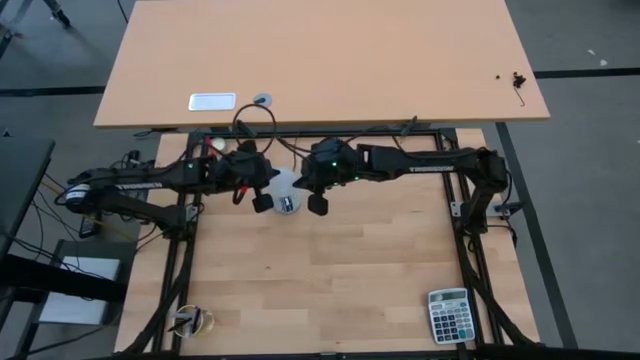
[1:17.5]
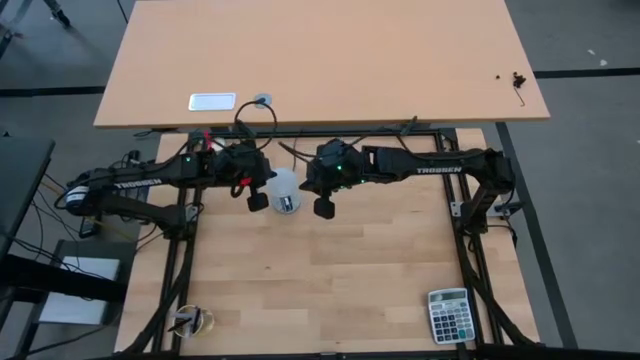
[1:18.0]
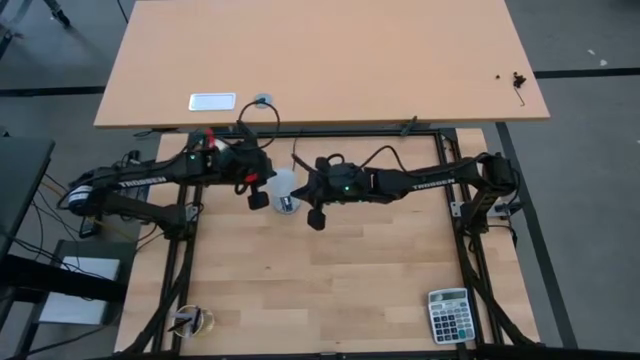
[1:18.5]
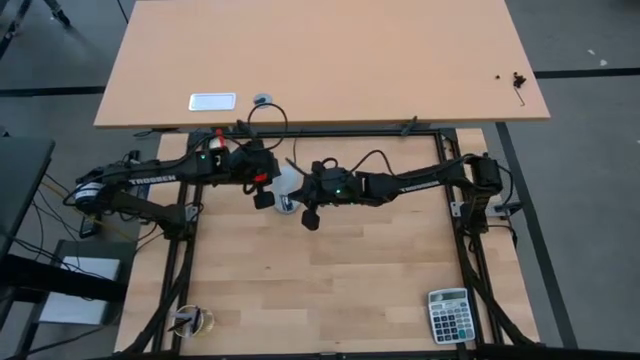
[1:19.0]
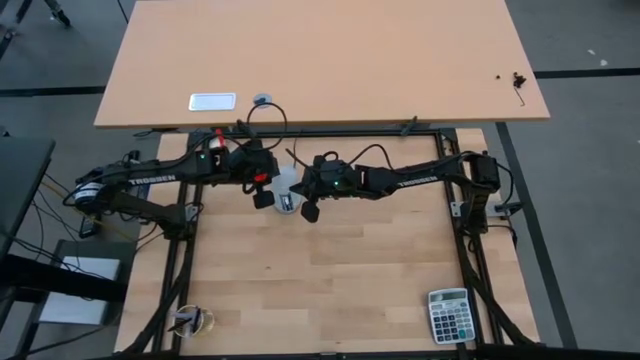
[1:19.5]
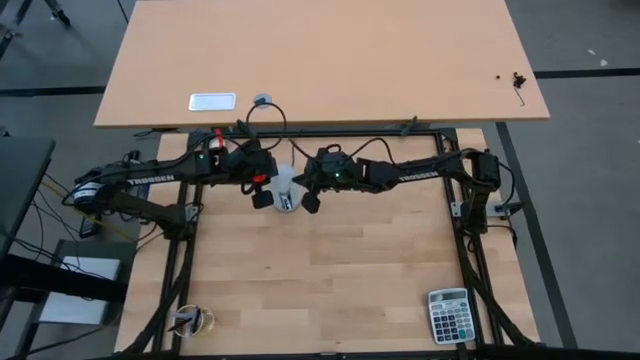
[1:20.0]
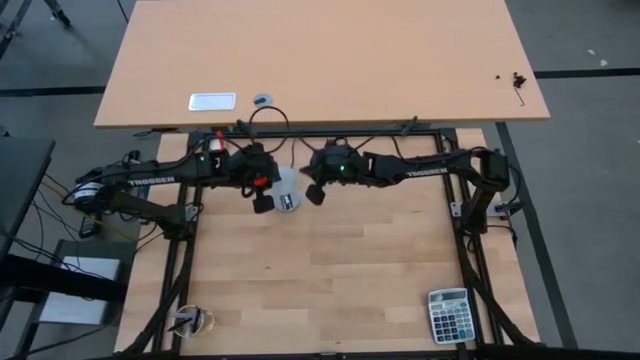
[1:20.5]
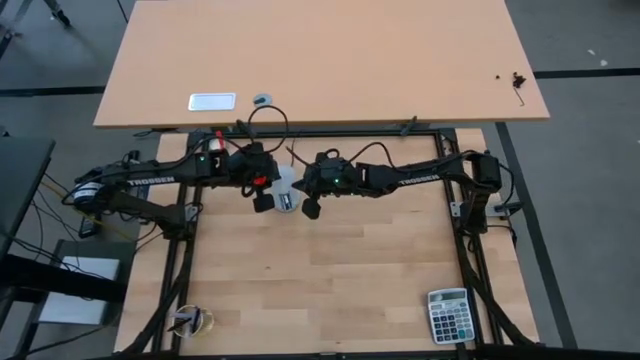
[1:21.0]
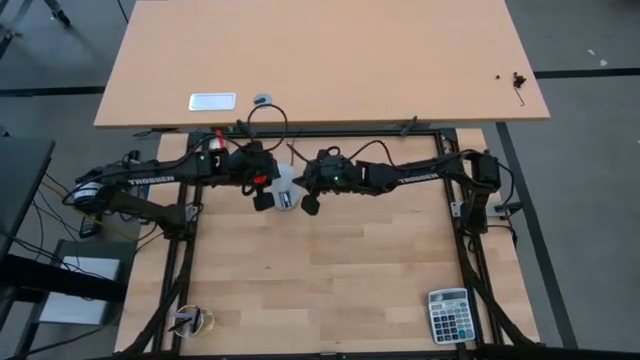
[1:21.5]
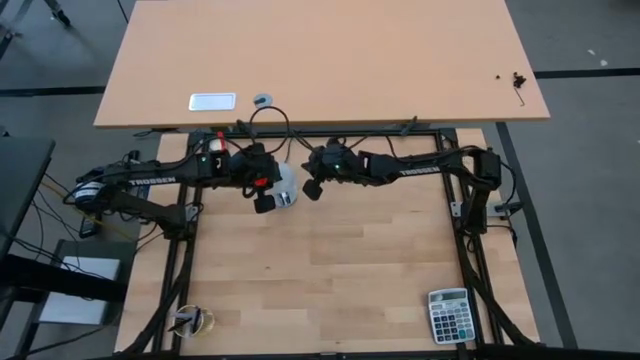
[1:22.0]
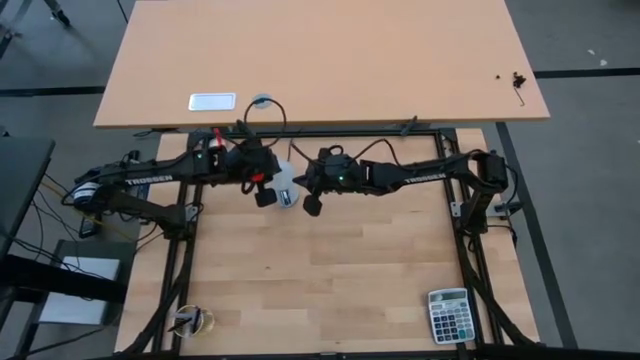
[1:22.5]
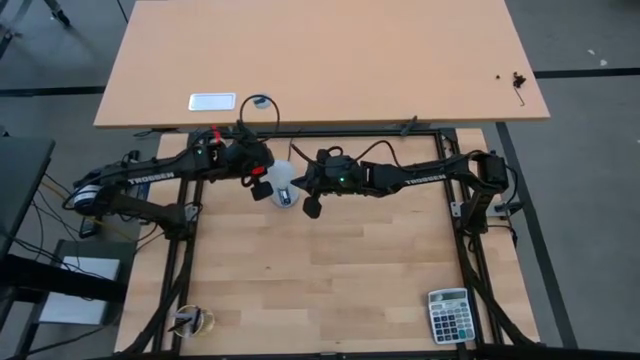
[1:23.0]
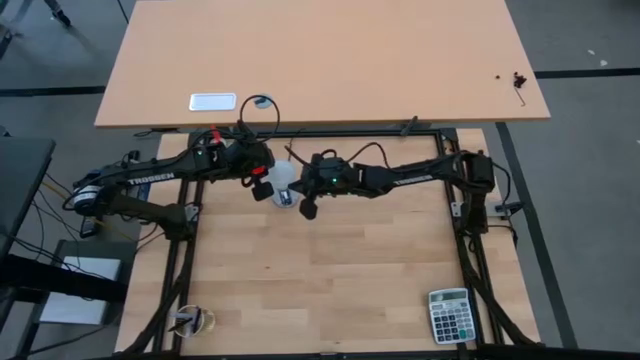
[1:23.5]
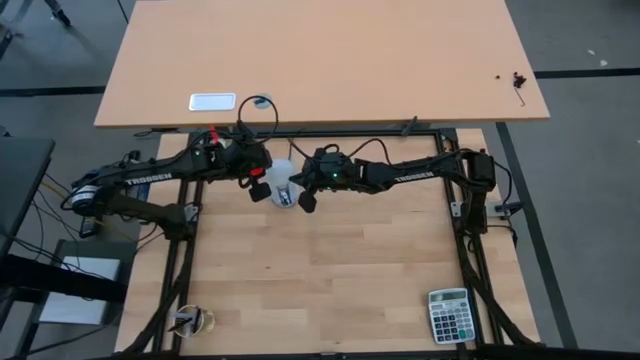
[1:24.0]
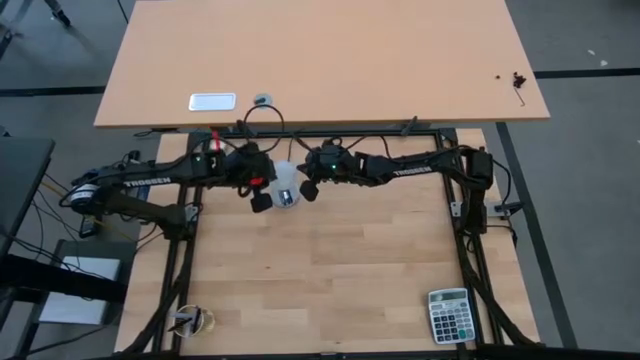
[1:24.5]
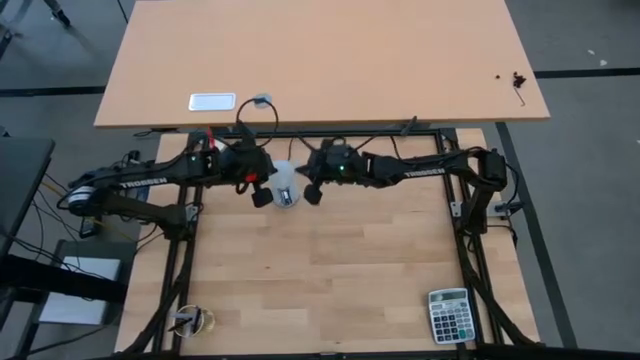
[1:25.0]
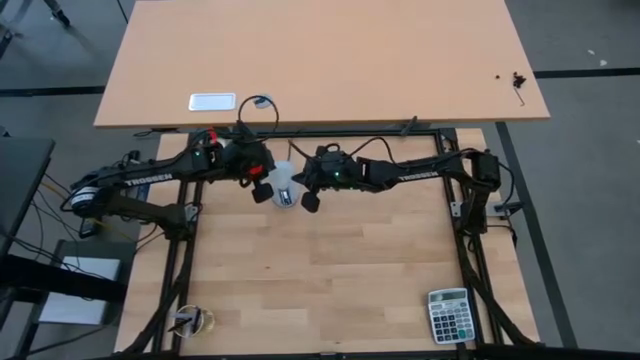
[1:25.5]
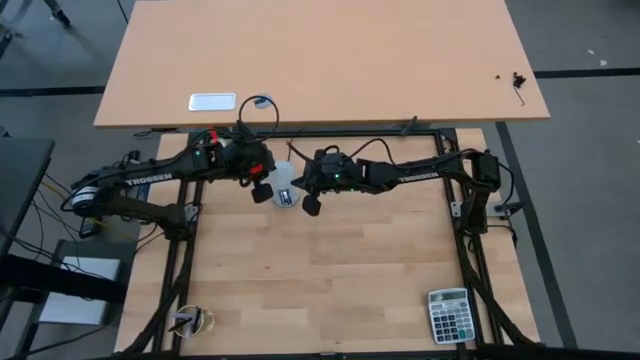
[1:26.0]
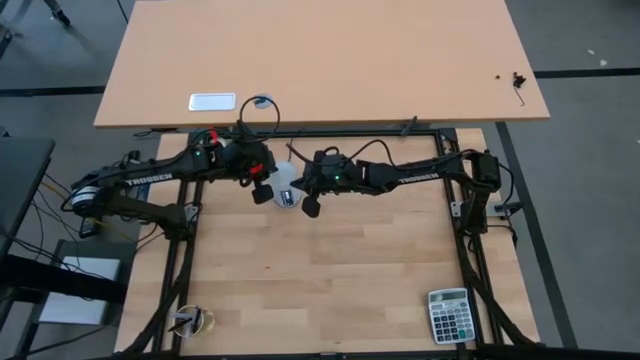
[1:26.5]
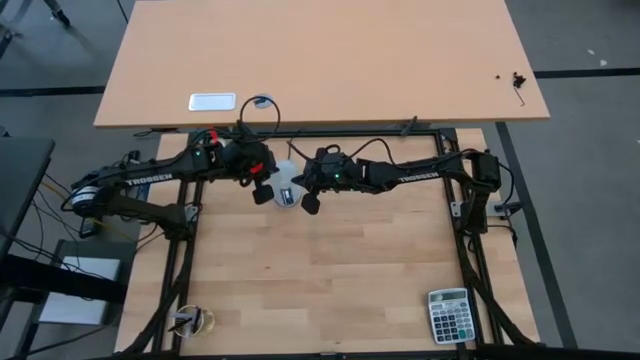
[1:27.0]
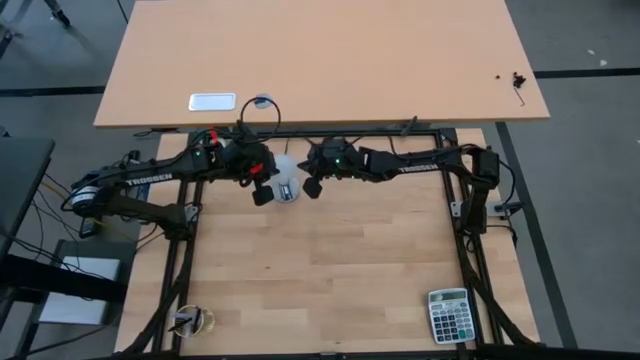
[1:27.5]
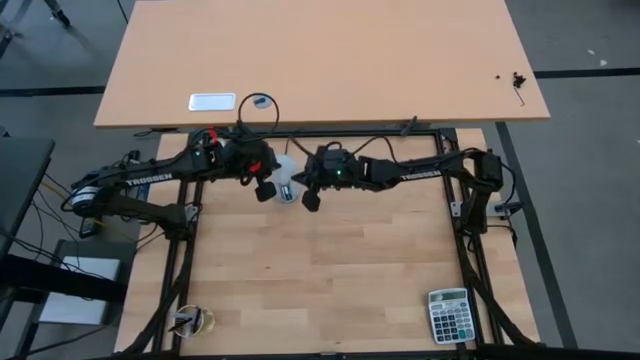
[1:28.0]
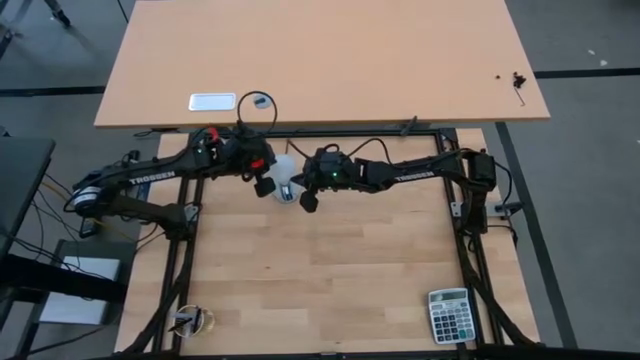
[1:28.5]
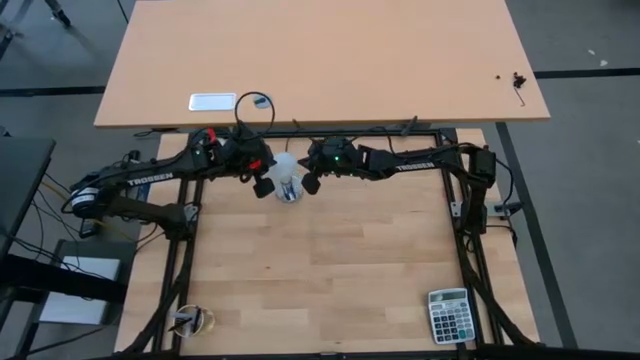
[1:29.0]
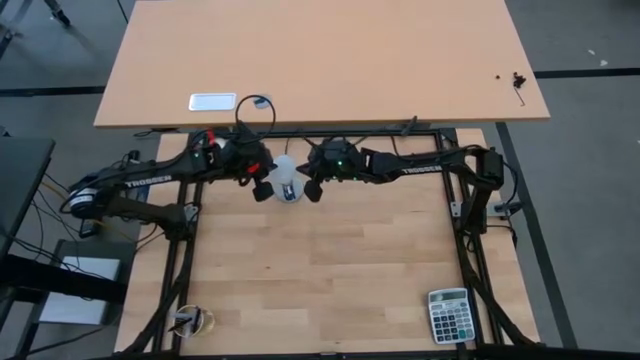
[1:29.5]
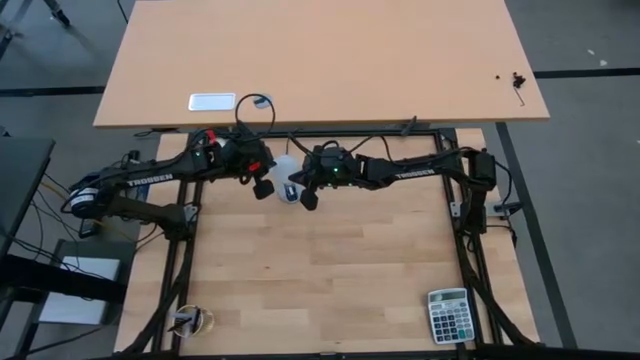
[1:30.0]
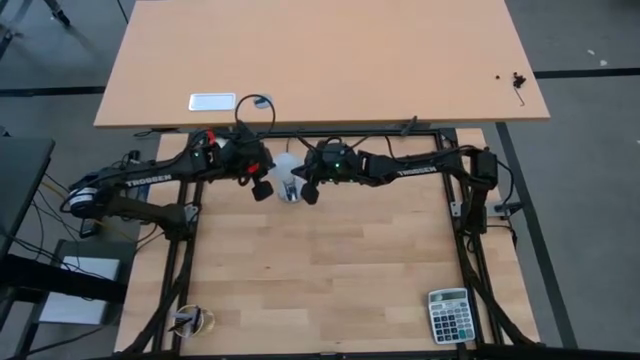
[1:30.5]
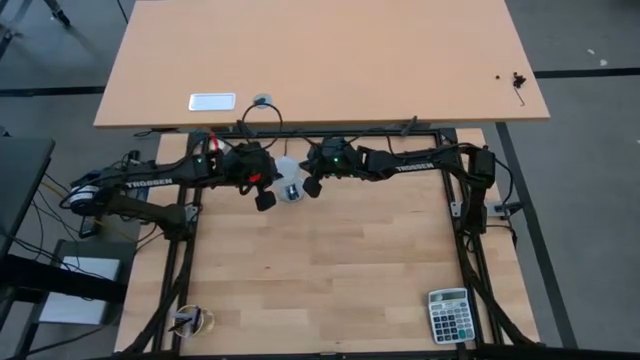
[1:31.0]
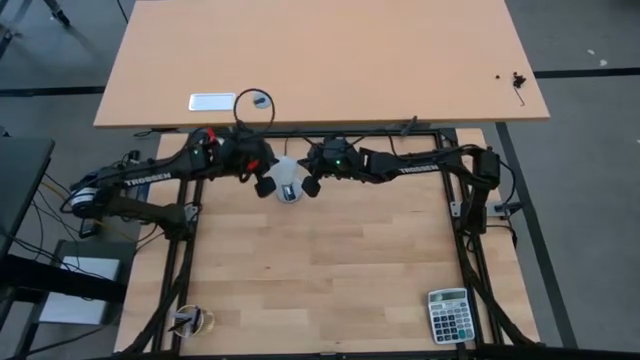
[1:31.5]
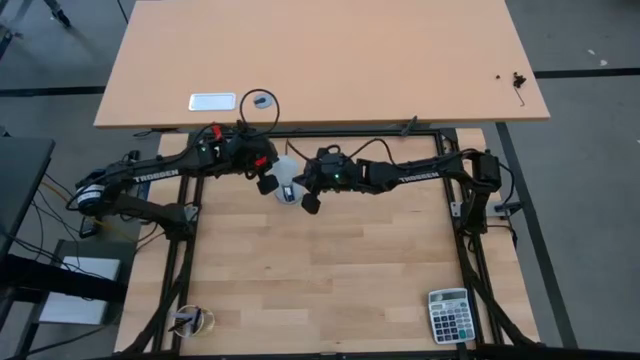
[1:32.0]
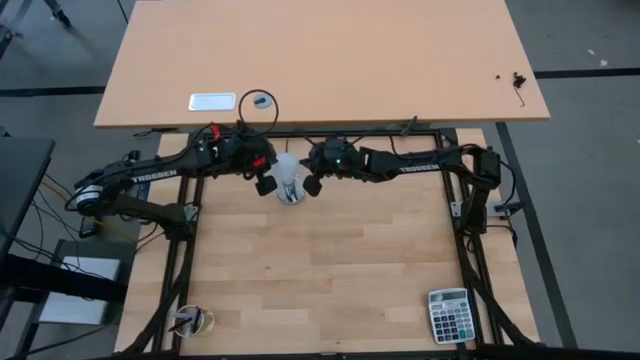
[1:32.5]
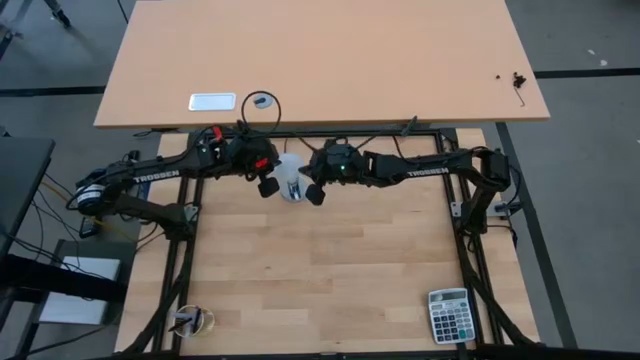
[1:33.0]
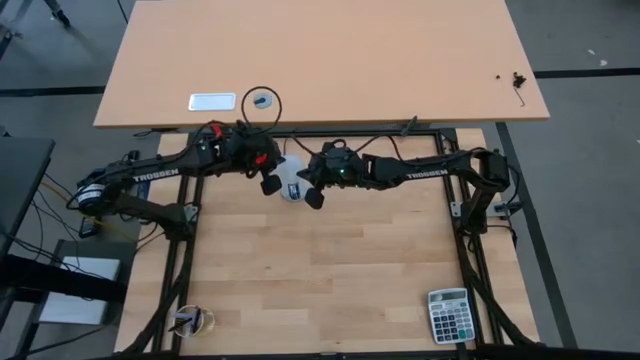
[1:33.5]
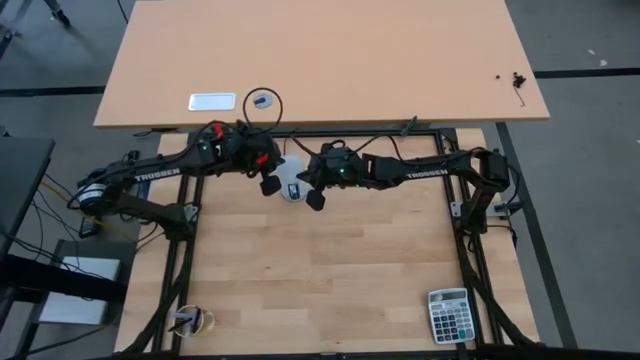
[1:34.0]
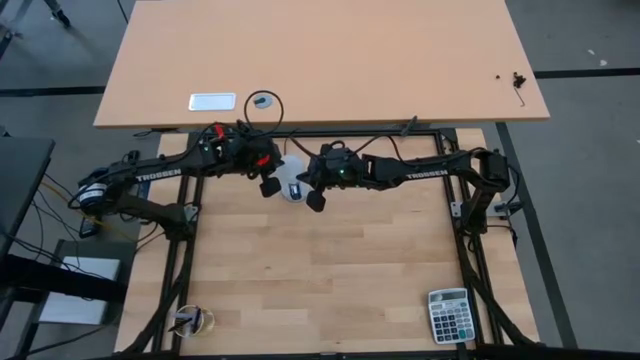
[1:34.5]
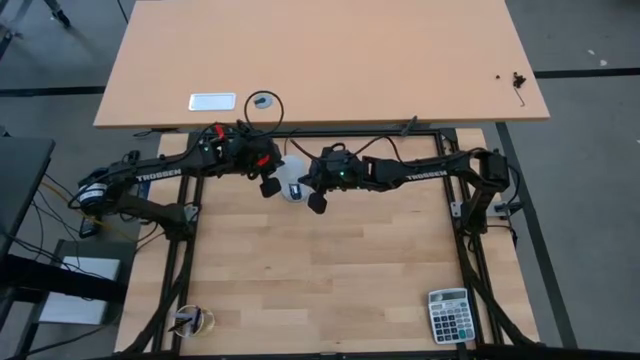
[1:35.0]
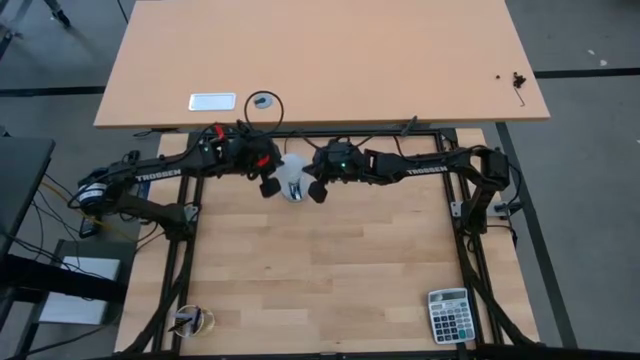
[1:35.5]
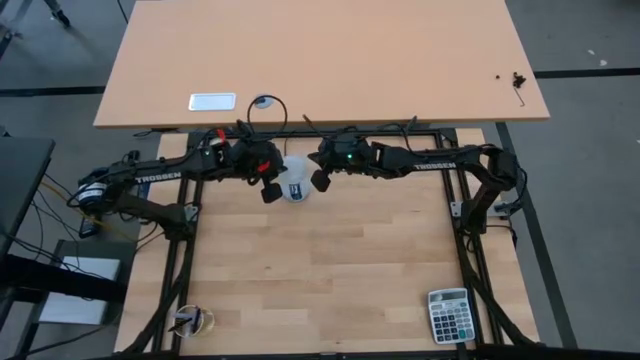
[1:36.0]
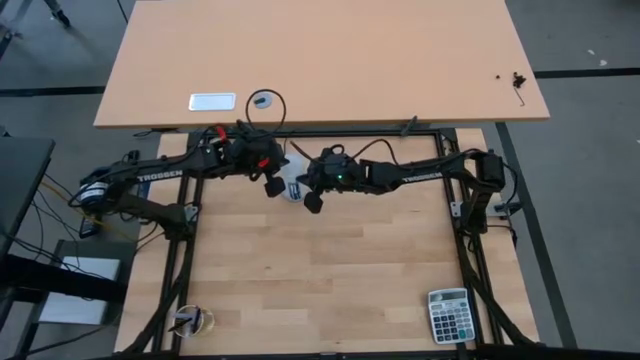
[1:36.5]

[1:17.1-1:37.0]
Task: Screw lightbulb
Remove the white light bulb from the silver lamp

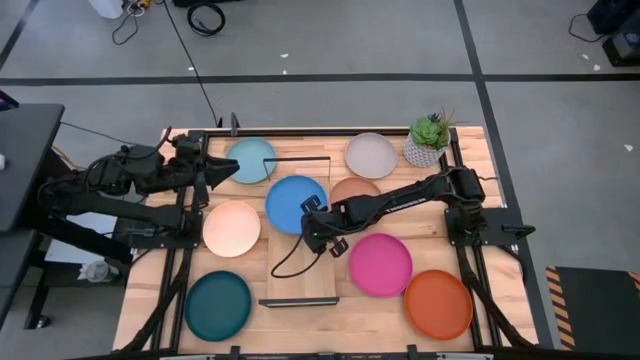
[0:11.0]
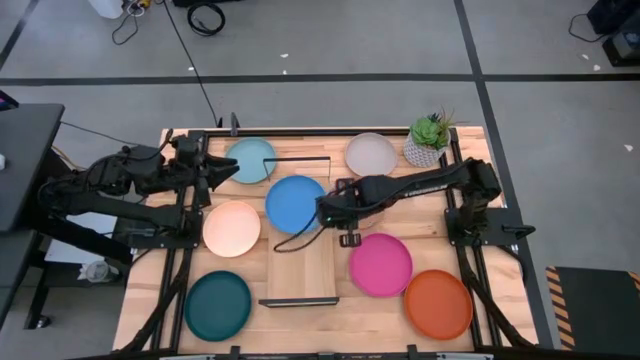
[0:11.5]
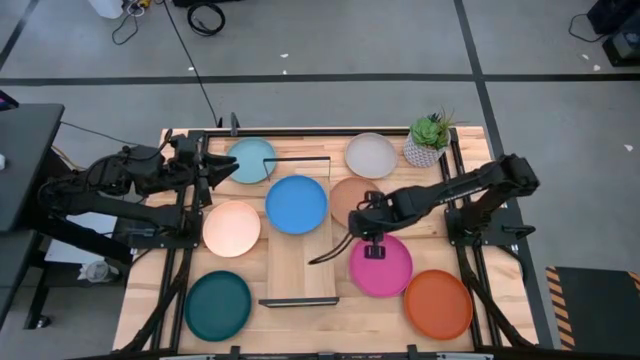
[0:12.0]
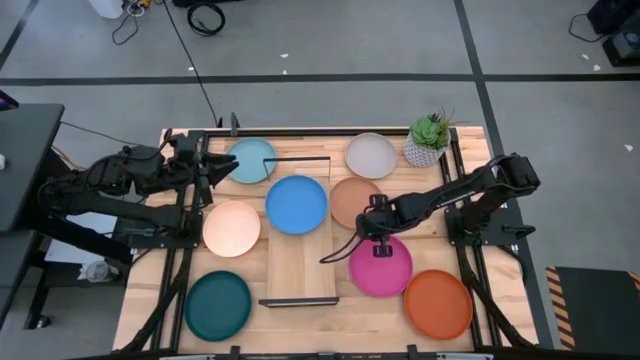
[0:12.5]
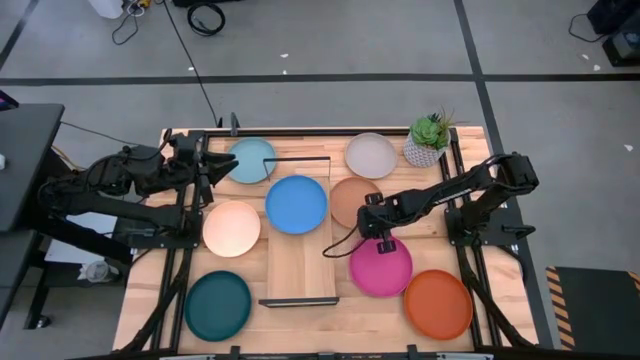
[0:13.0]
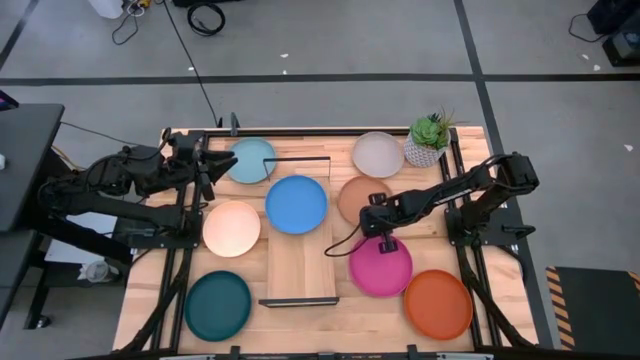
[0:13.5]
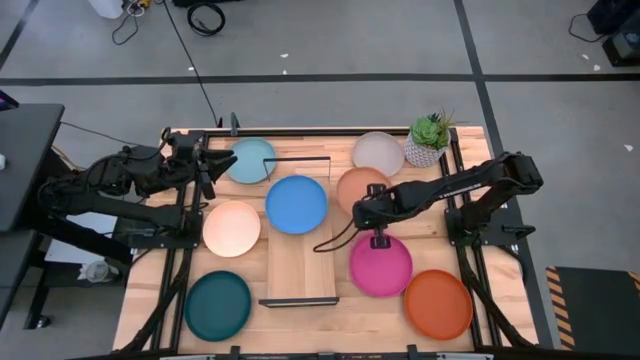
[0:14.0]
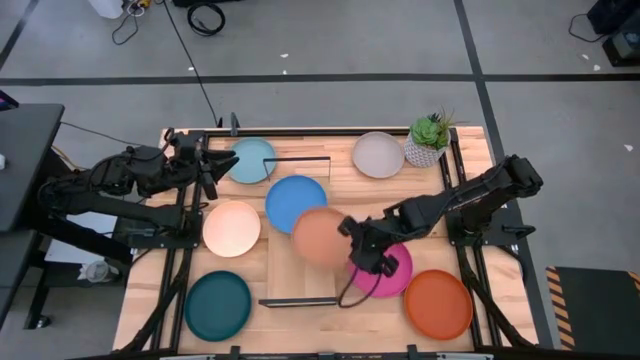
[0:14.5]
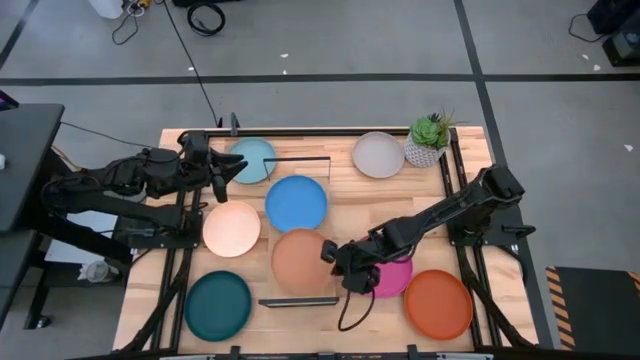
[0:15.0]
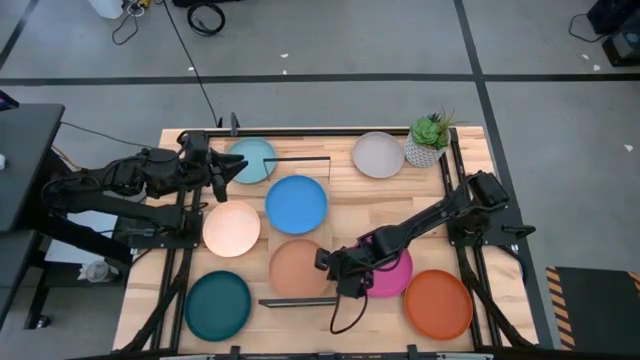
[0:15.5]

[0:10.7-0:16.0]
Task: Place and stack plates onto a shelf
Put the brown plate on the shelf
